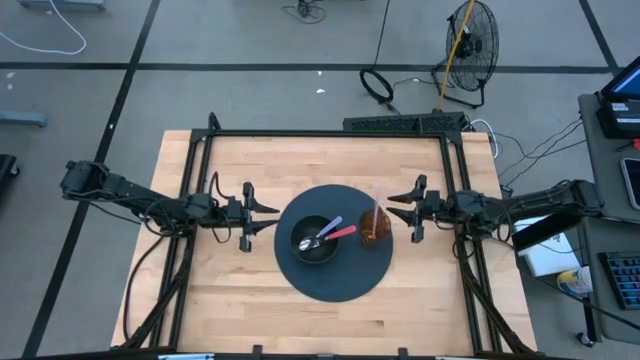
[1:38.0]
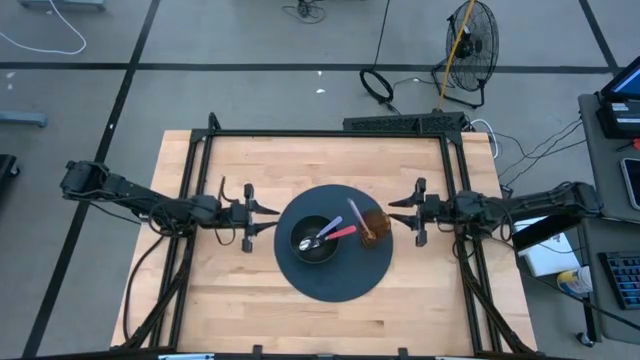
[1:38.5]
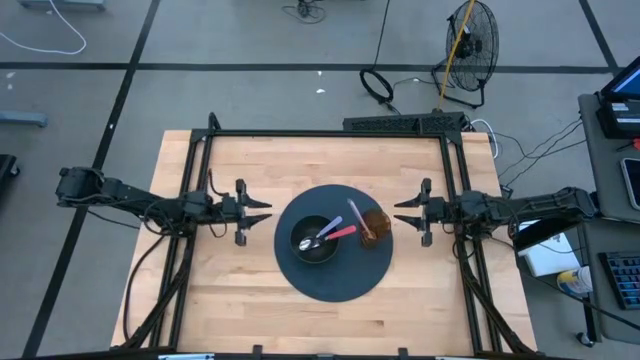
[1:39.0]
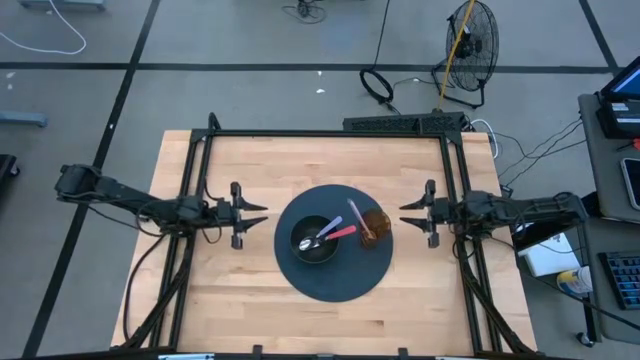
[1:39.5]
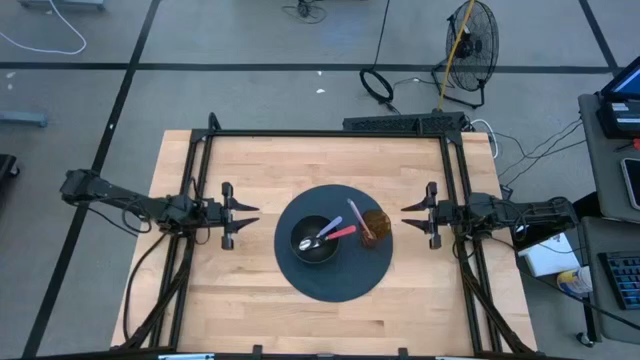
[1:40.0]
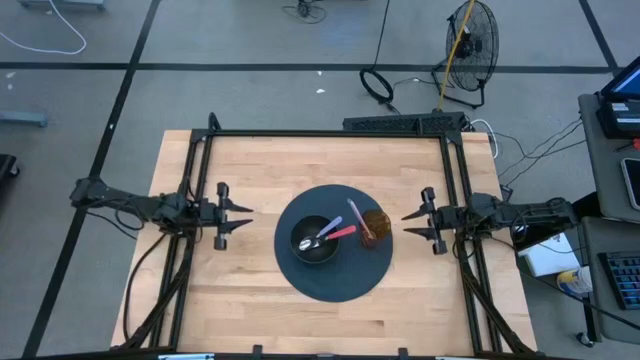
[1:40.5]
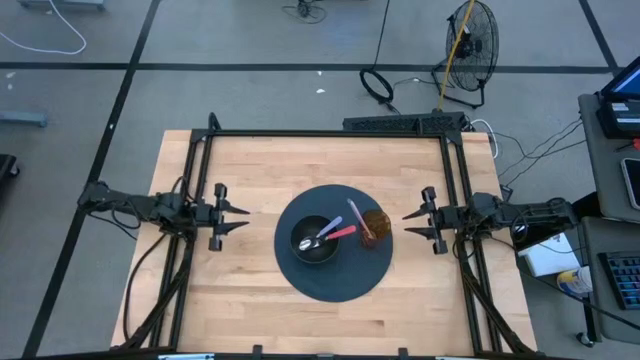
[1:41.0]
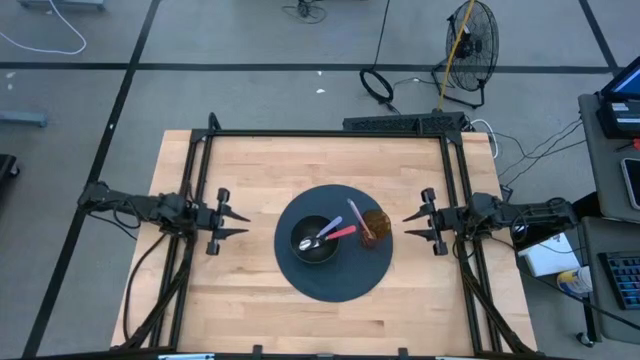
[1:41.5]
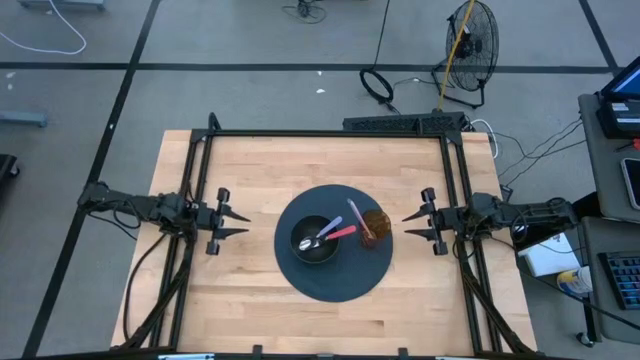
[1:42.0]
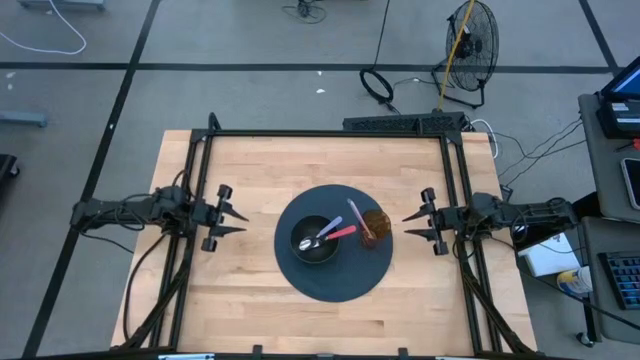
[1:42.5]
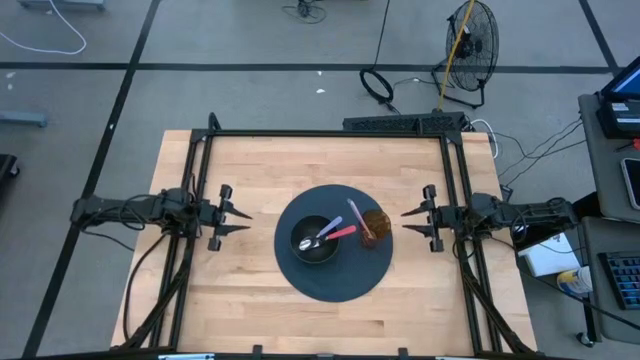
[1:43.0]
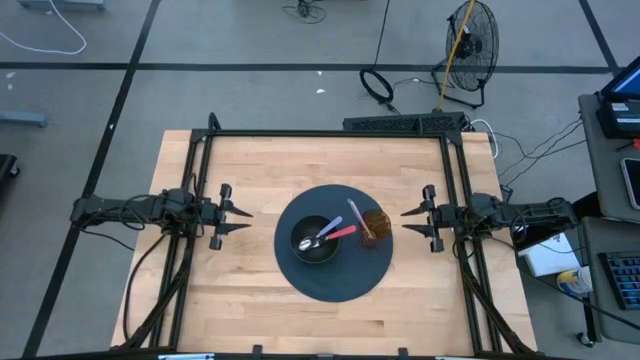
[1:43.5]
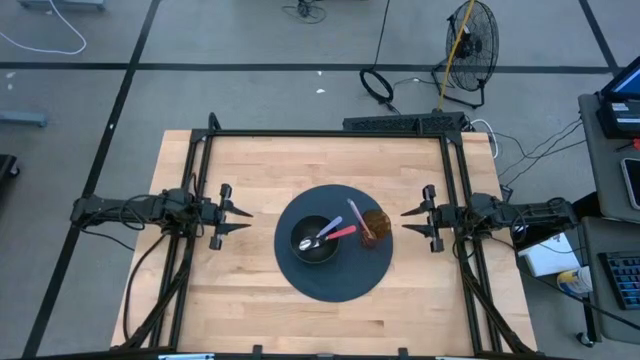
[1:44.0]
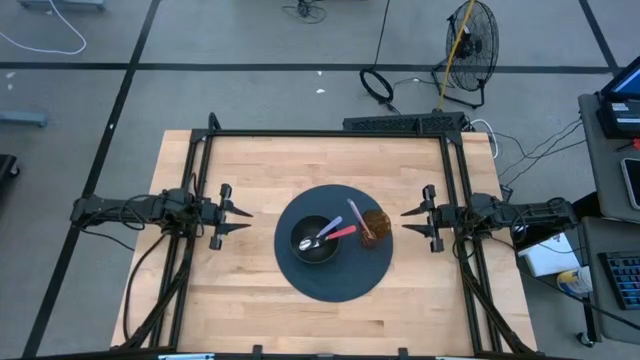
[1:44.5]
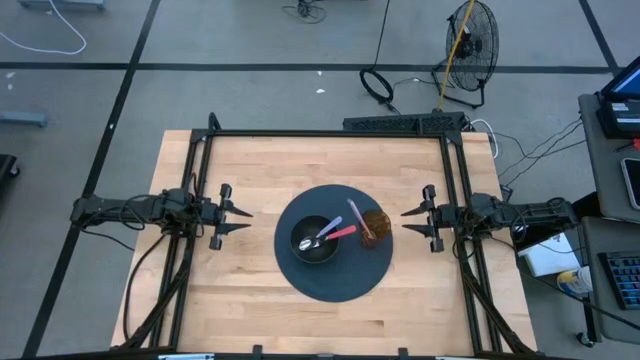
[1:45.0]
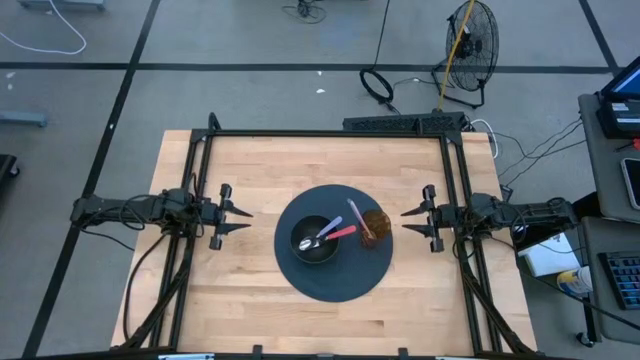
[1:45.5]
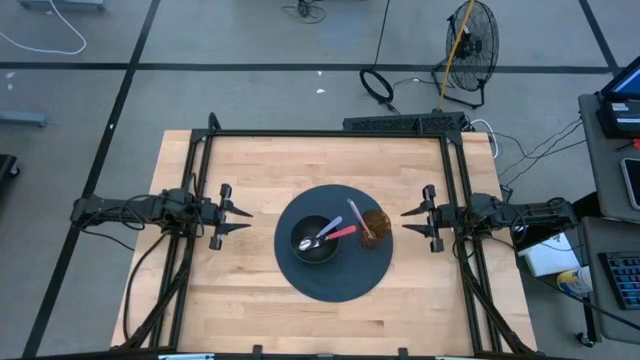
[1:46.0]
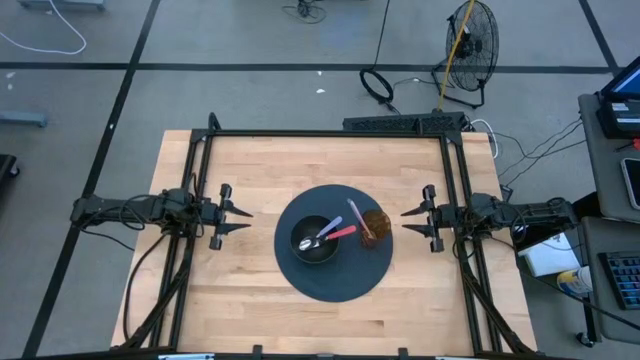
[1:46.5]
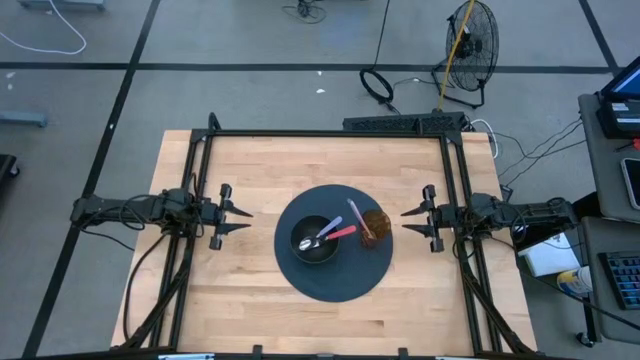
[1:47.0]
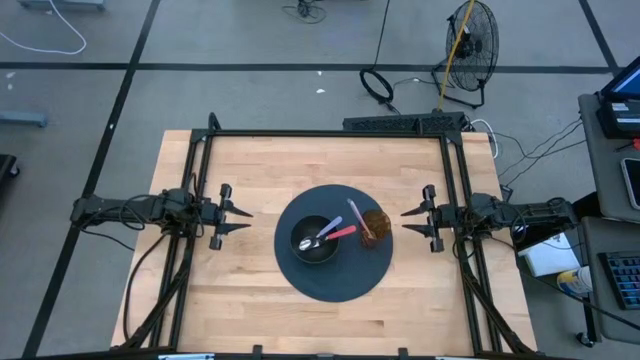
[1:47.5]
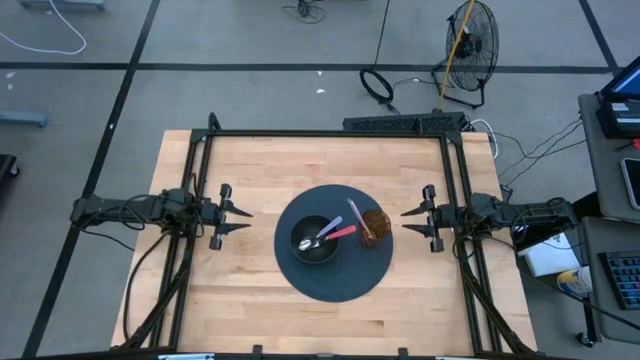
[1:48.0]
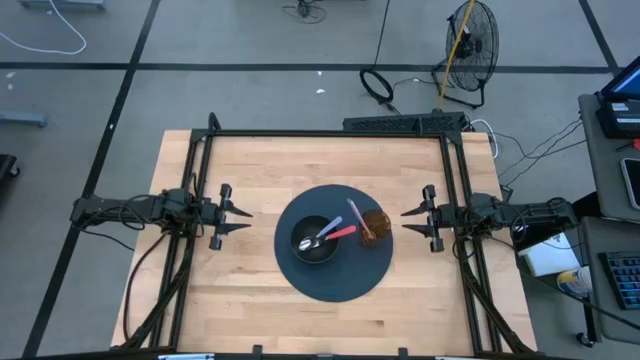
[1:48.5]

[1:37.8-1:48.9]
Task: Pick & Place Utensil
Return to Home Position

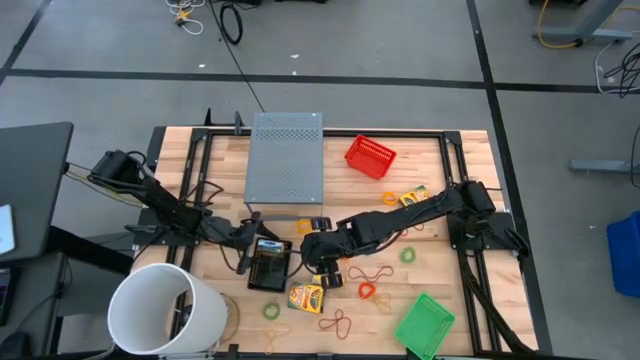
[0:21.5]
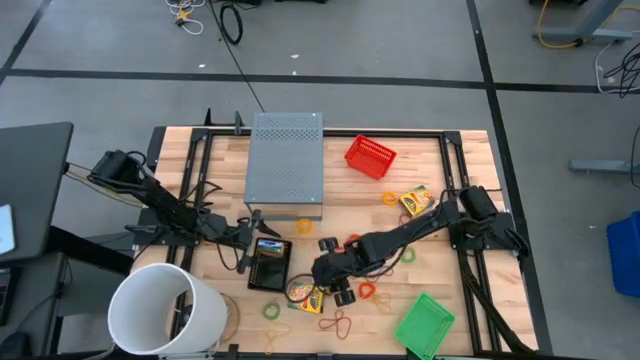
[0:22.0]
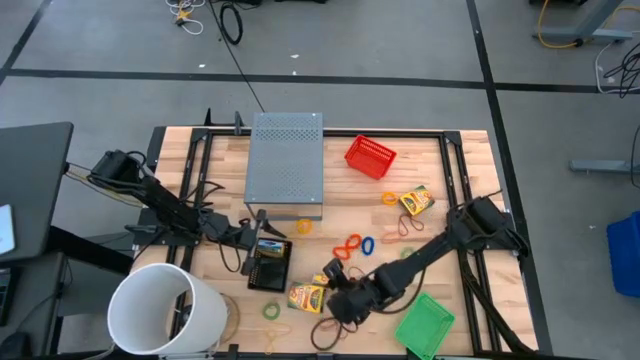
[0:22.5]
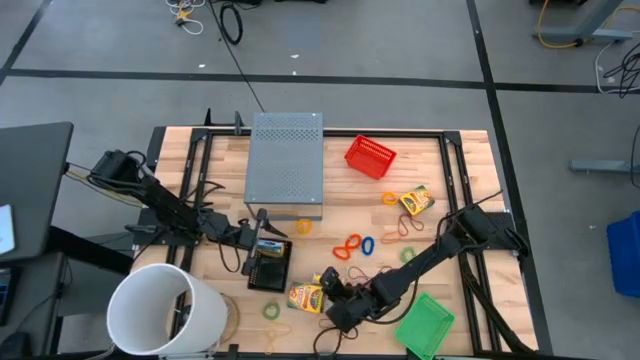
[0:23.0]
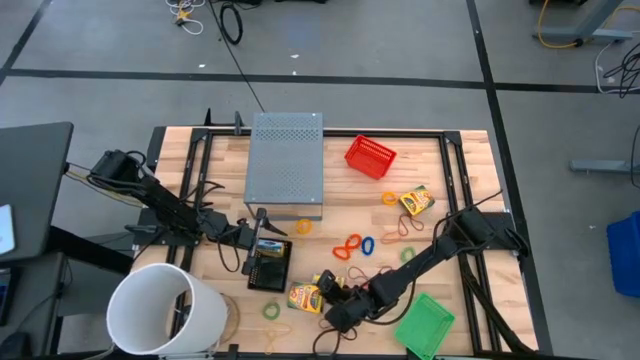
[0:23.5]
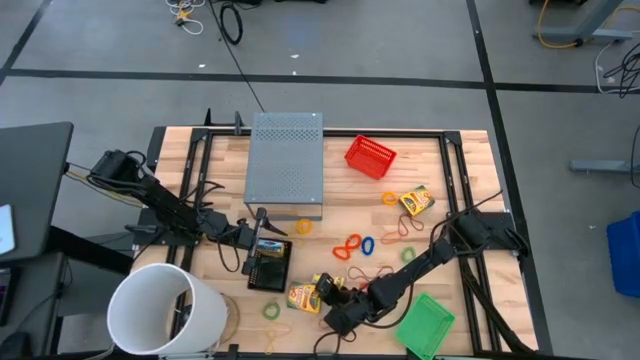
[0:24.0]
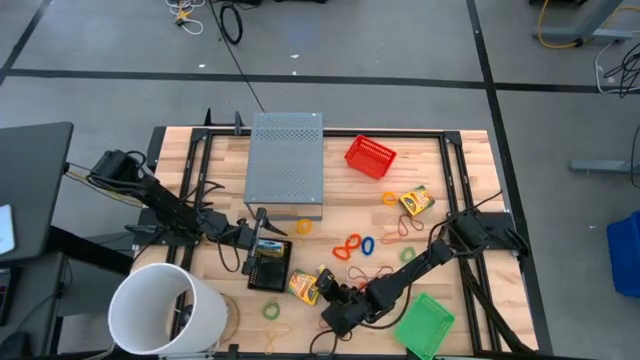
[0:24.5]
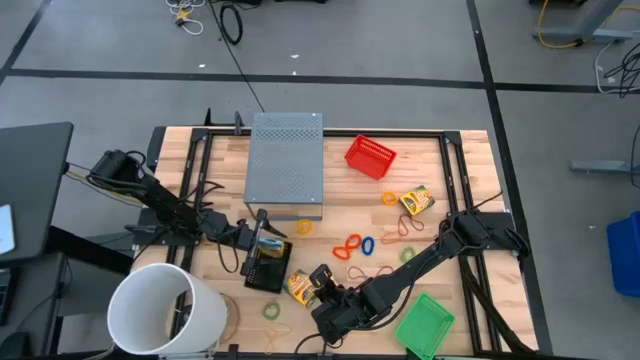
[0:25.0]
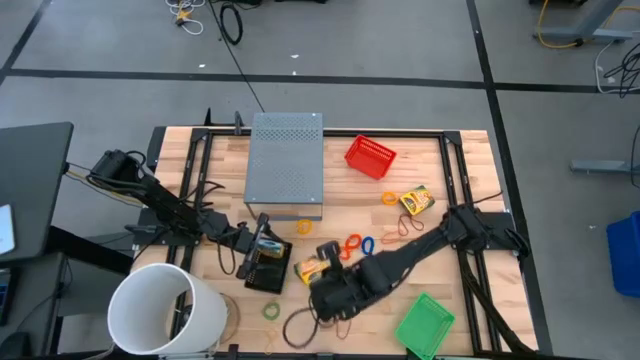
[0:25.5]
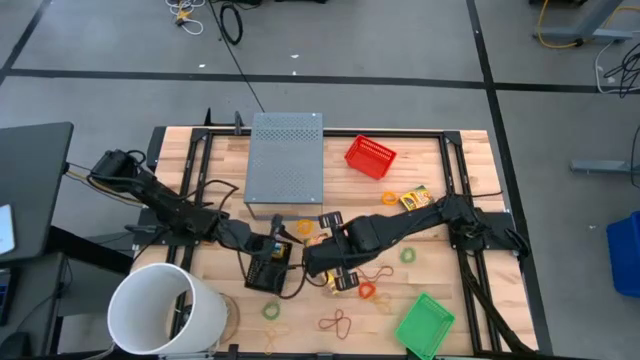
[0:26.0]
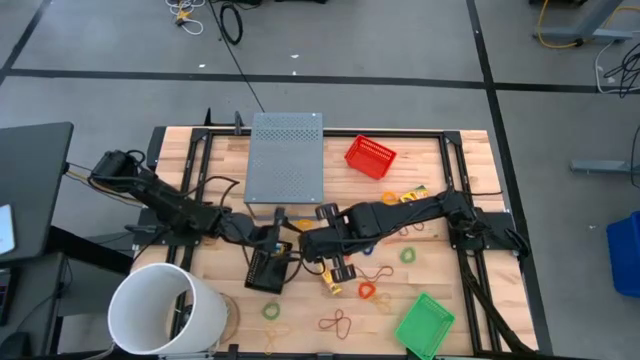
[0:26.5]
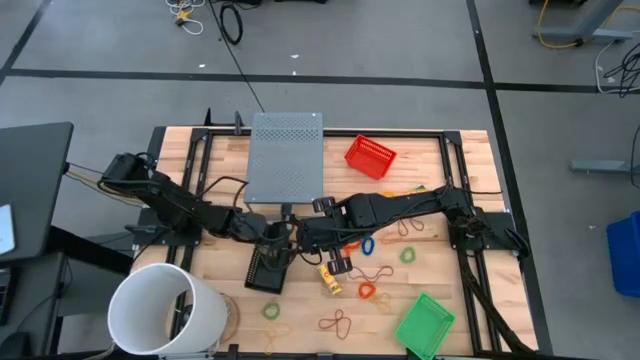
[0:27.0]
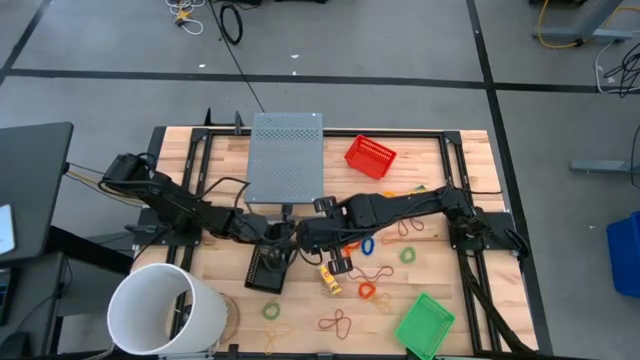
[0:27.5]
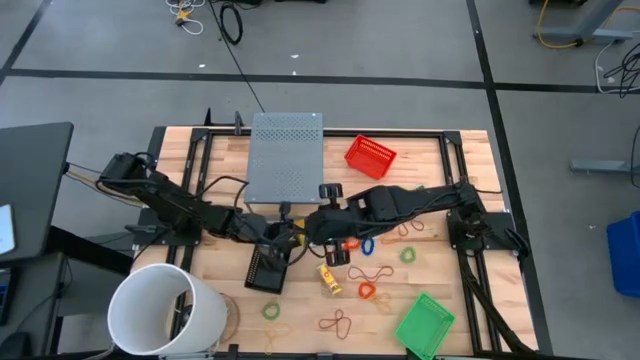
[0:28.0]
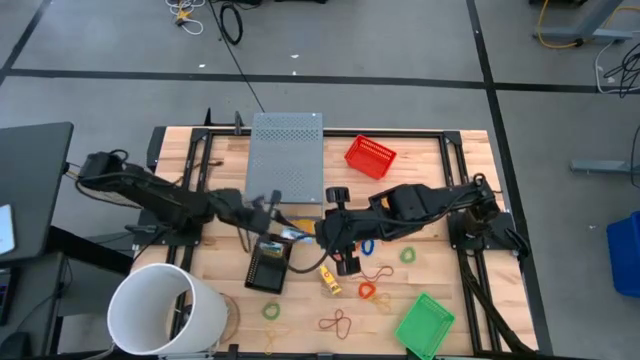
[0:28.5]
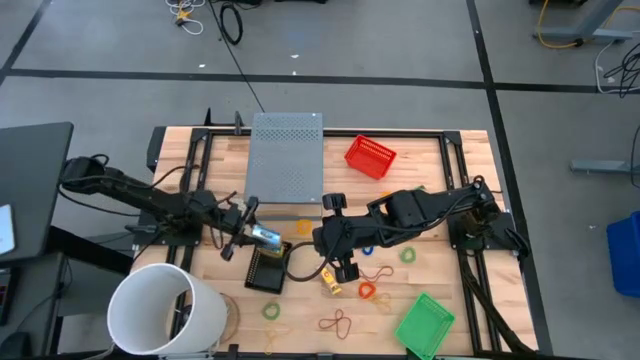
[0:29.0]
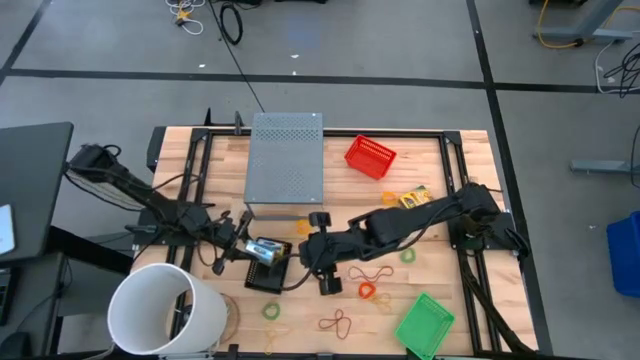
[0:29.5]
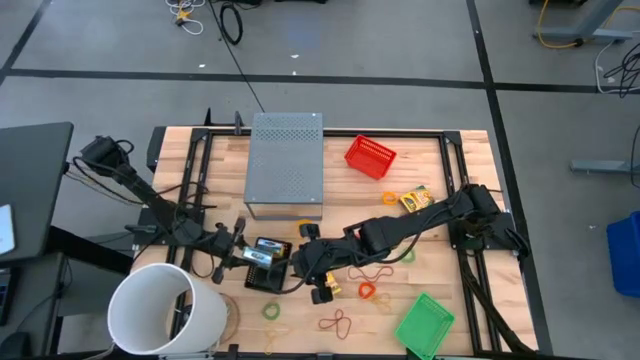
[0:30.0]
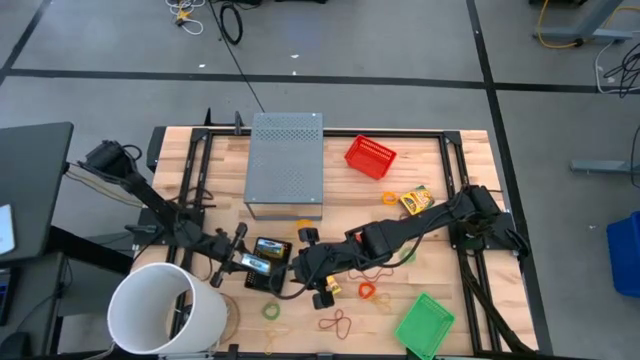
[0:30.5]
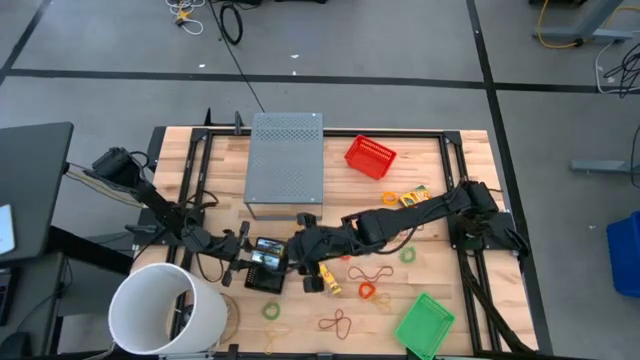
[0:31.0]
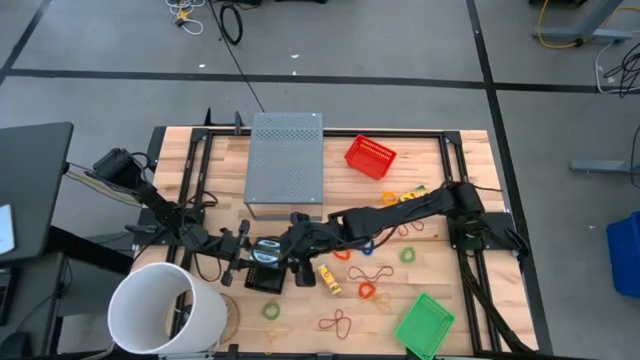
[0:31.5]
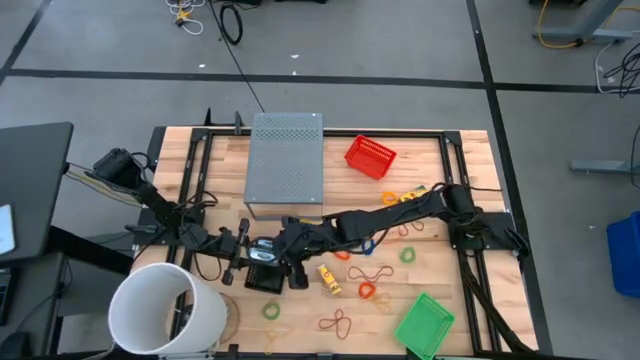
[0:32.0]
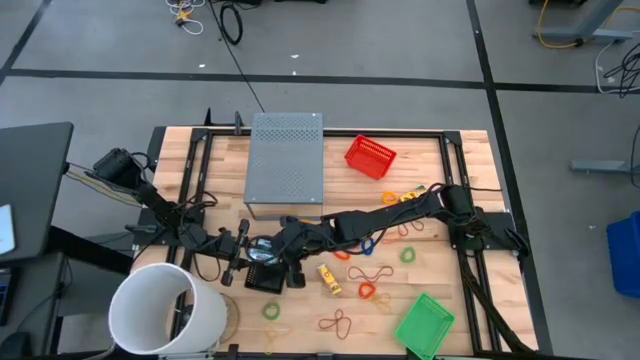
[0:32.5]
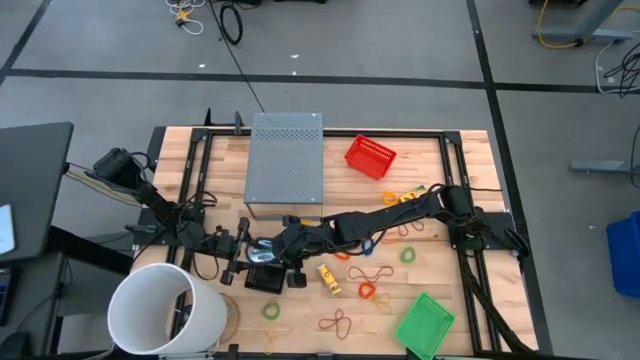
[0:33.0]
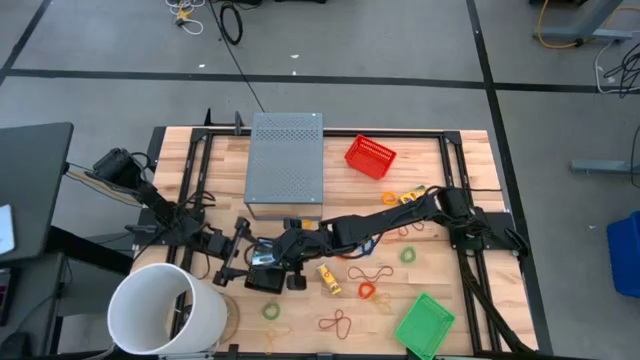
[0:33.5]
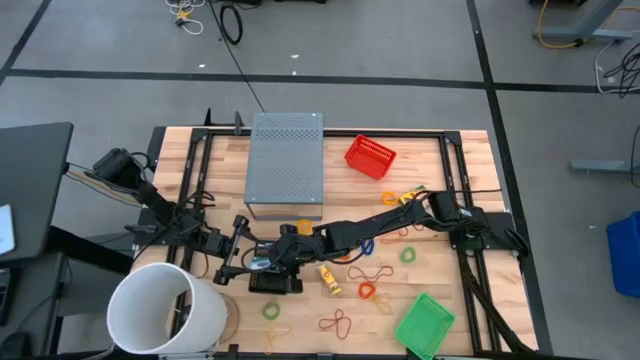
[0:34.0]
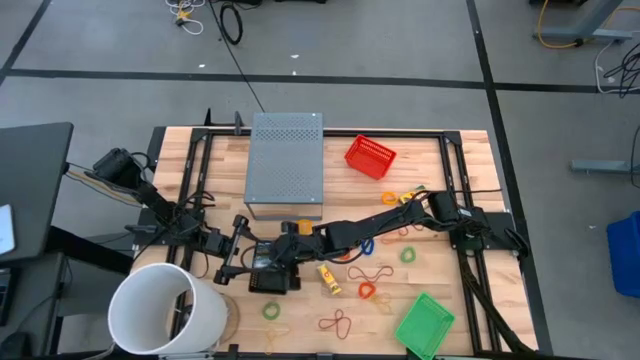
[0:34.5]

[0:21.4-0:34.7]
Task: Pick & Place Office Desk Supplies
Put the bottom crayon box into the black basket
